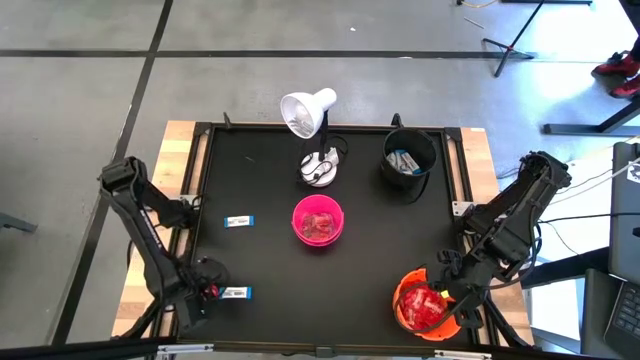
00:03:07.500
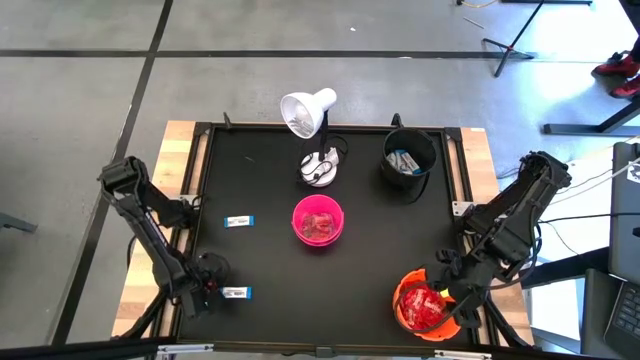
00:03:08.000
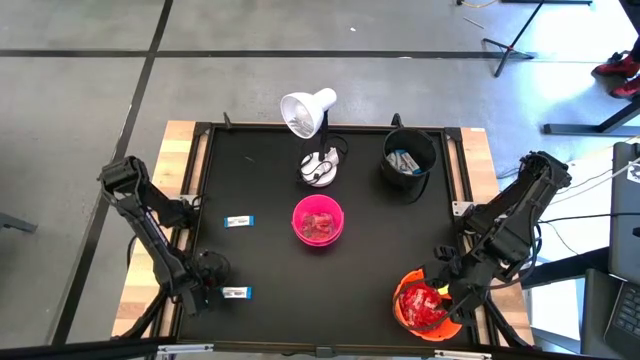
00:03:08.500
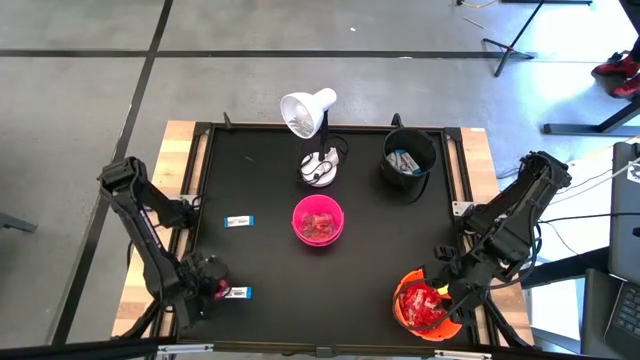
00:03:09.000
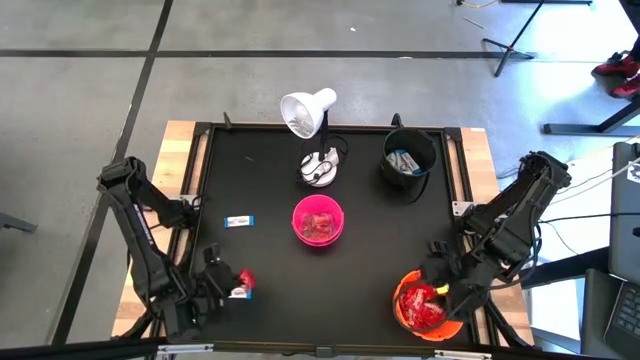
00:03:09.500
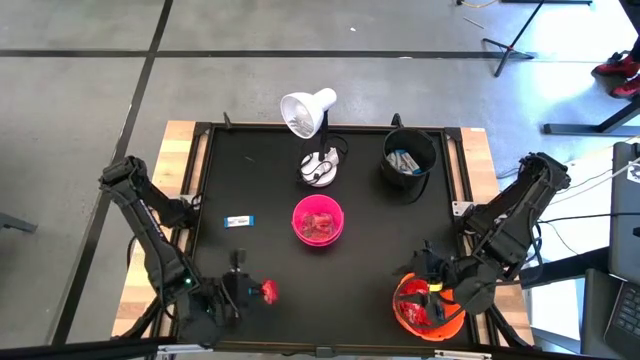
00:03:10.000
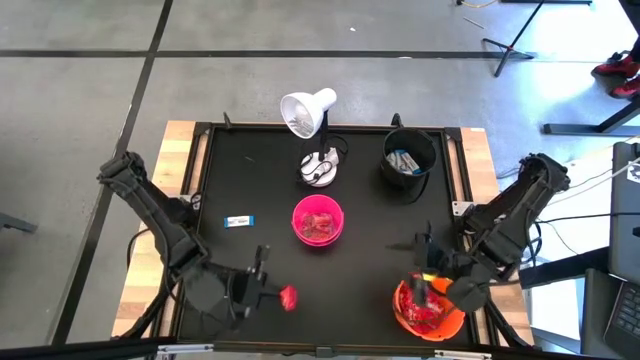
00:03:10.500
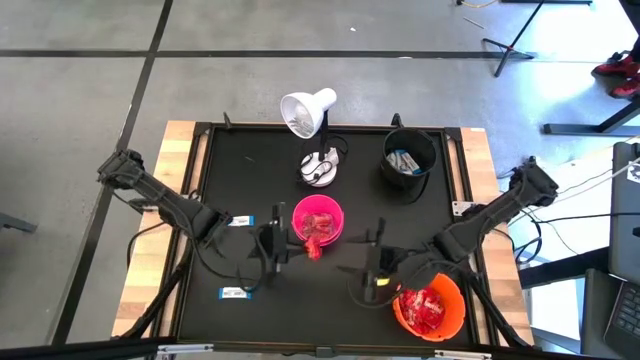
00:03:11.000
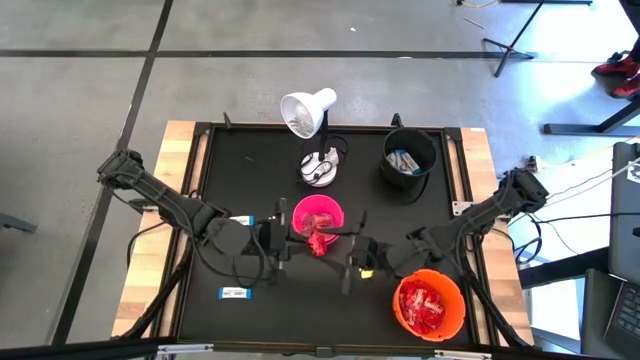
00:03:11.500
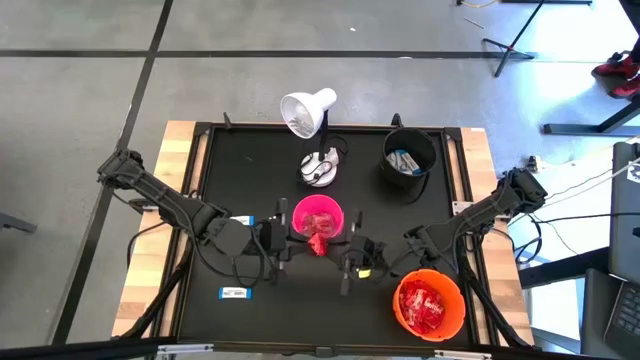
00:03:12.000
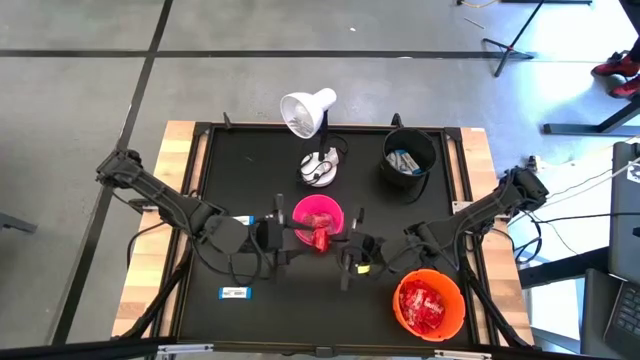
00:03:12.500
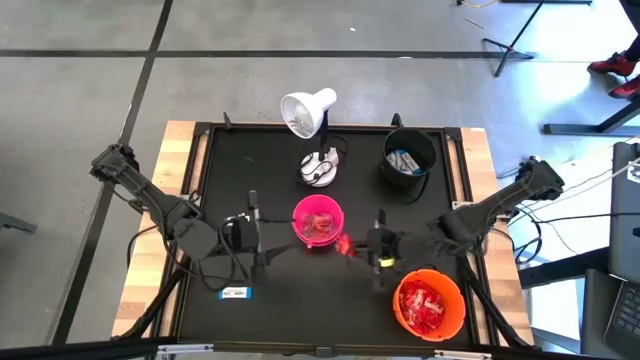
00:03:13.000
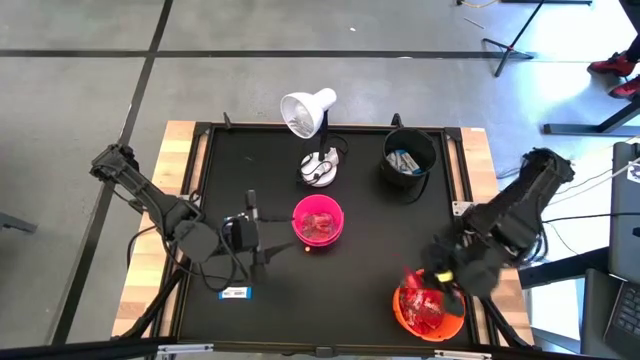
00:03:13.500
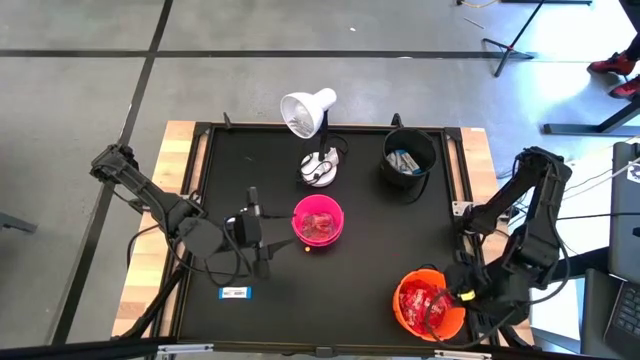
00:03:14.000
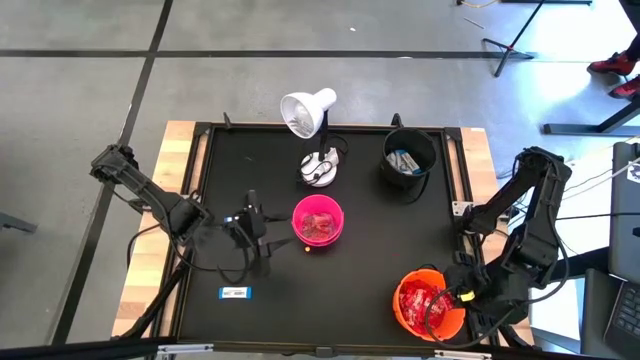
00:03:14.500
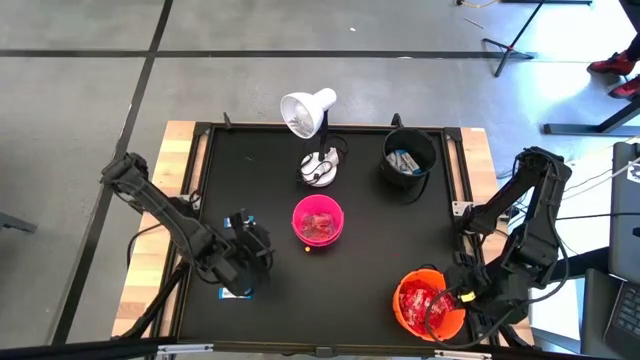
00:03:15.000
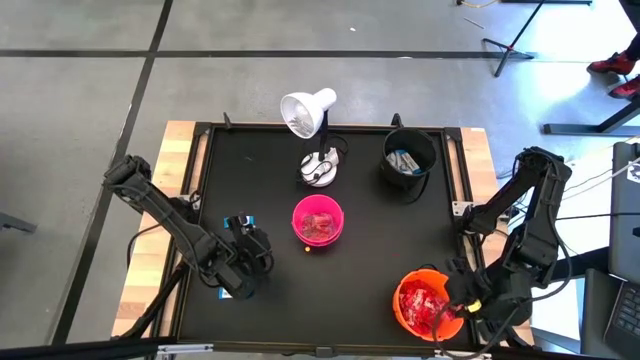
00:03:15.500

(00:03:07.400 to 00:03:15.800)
Task: Sort candy
Put the red candy into the orange bucket

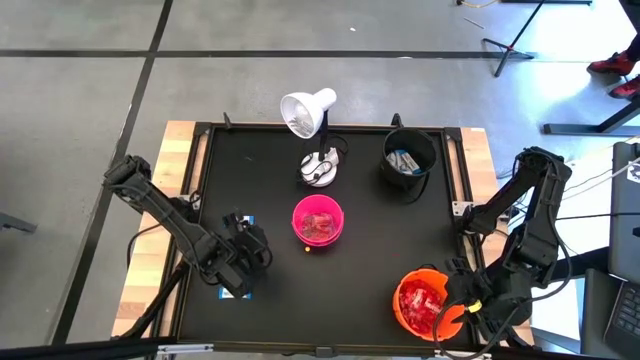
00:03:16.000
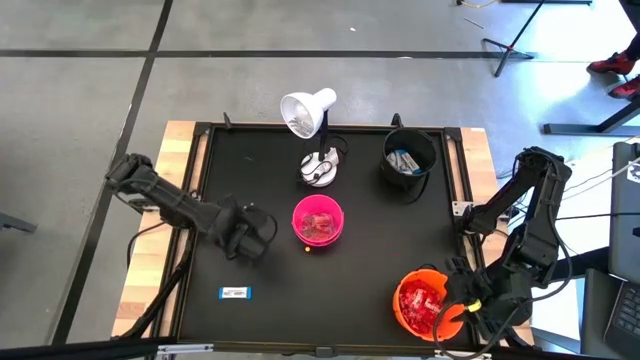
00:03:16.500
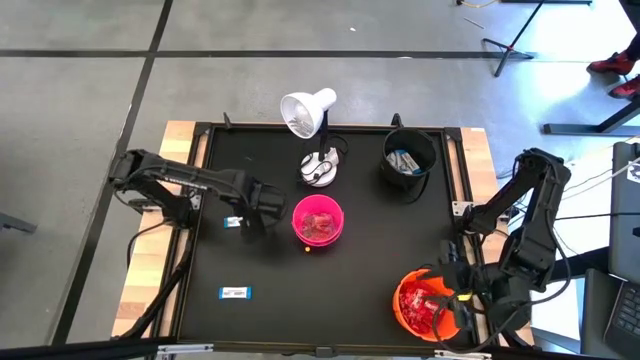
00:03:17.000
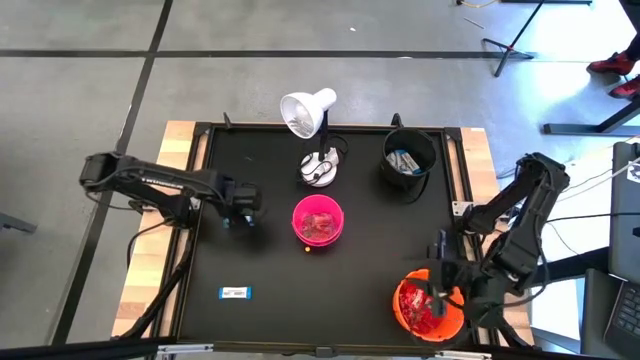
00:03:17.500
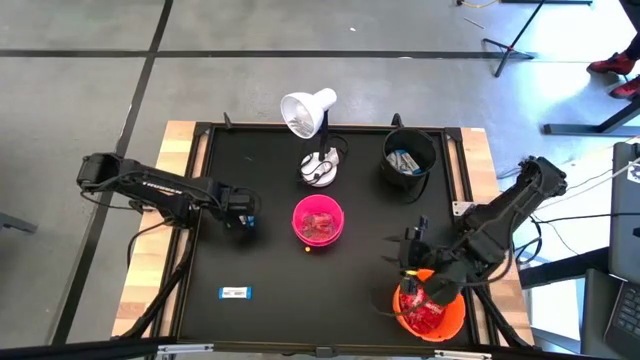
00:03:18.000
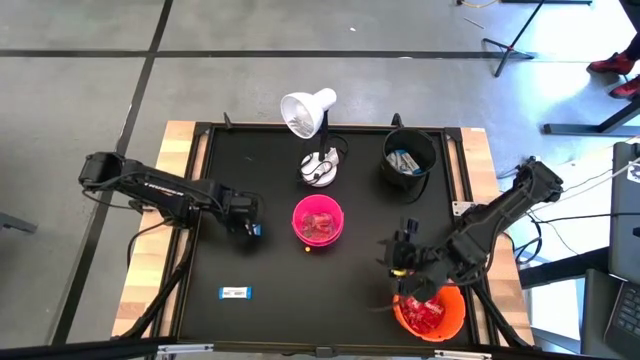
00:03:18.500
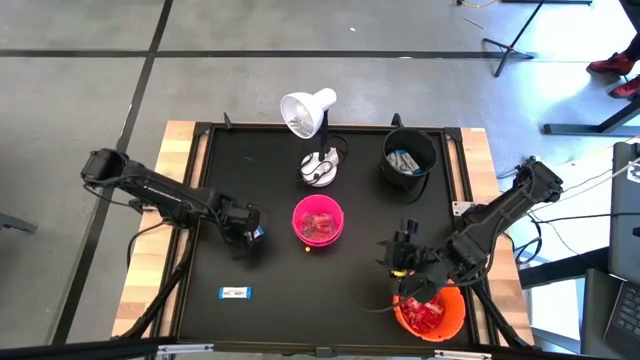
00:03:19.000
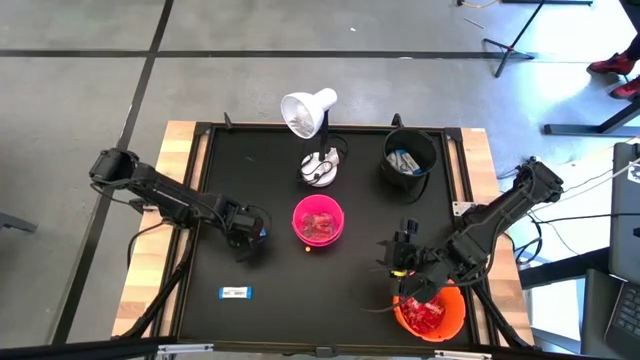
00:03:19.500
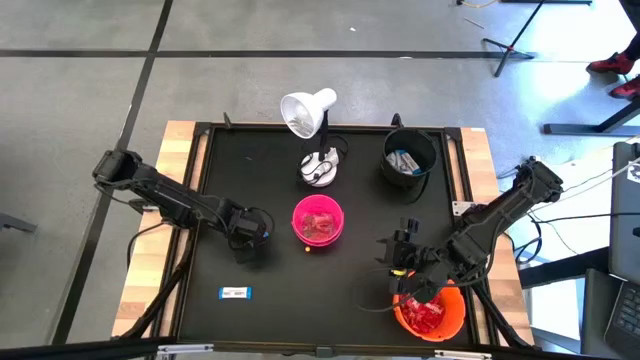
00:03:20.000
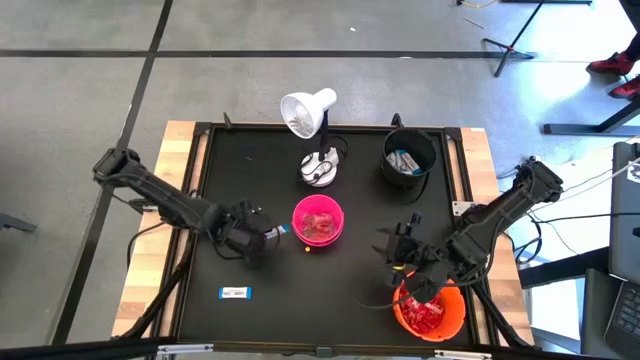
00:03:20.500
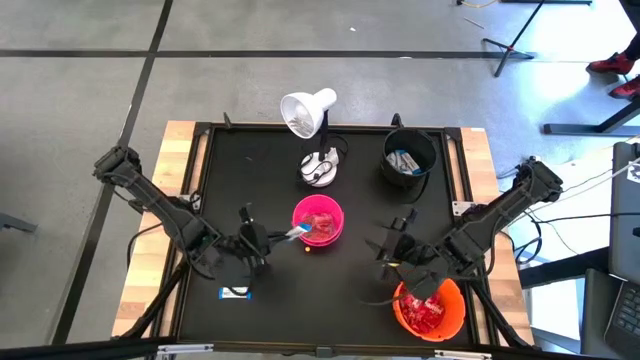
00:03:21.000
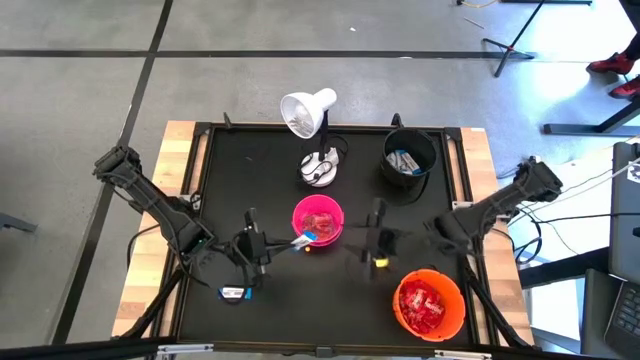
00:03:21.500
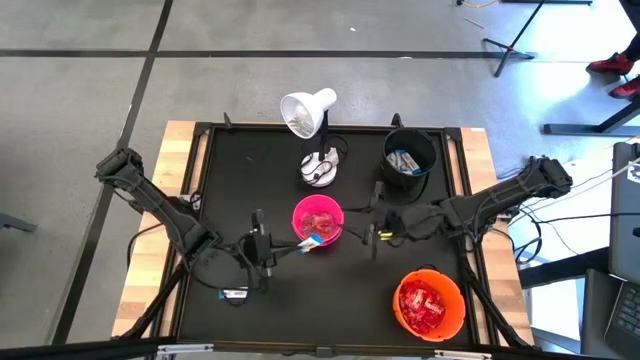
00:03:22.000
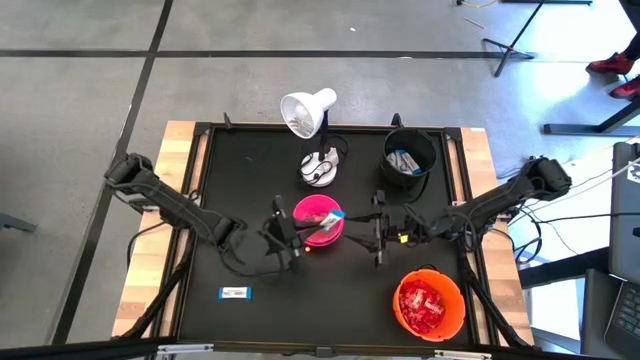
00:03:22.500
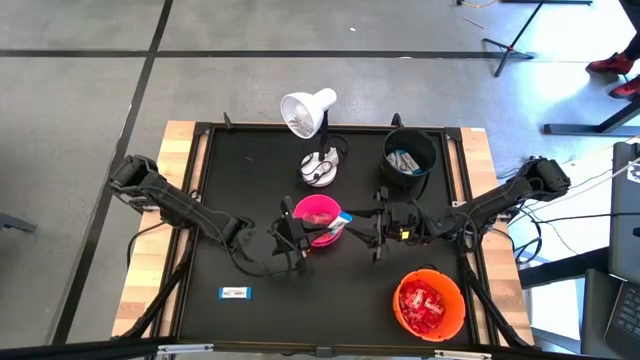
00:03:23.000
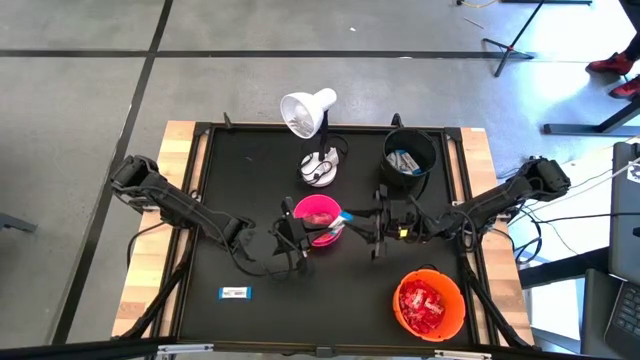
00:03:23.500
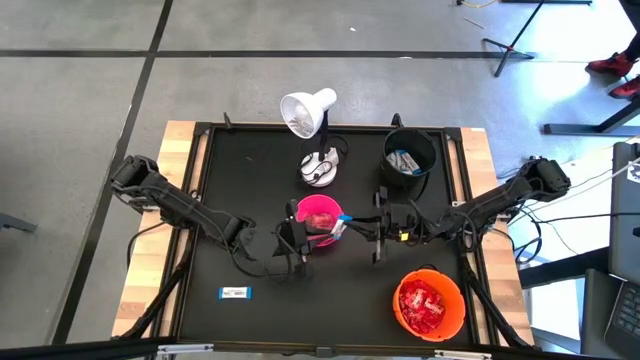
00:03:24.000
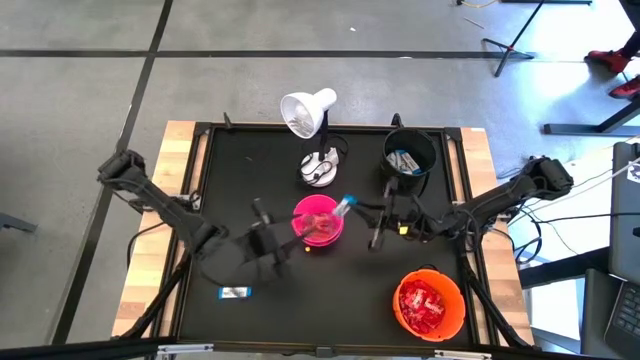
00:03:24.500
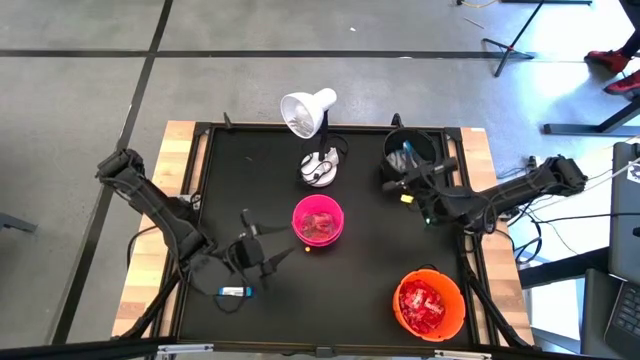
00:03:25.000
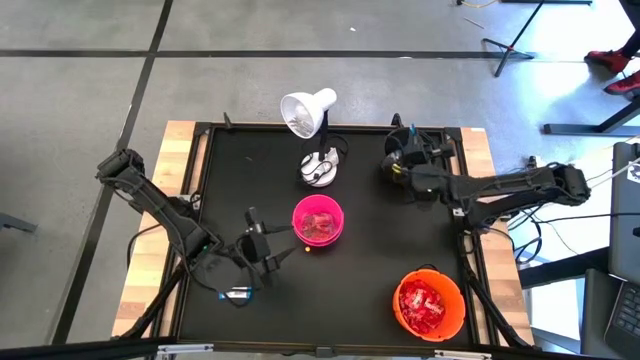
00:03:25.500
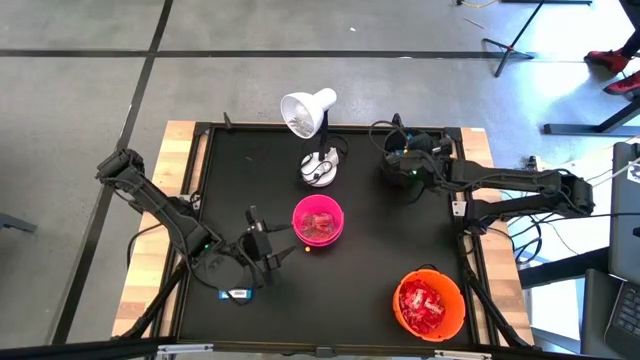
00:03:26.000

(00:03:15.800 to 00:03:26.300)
Put the white chocolate bar into the black bucket

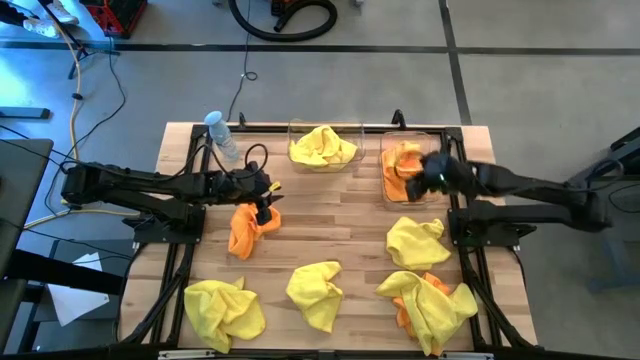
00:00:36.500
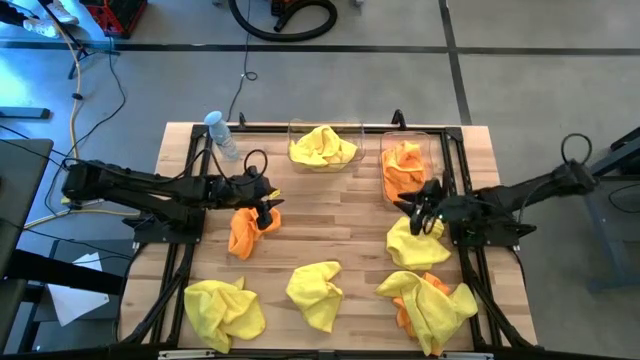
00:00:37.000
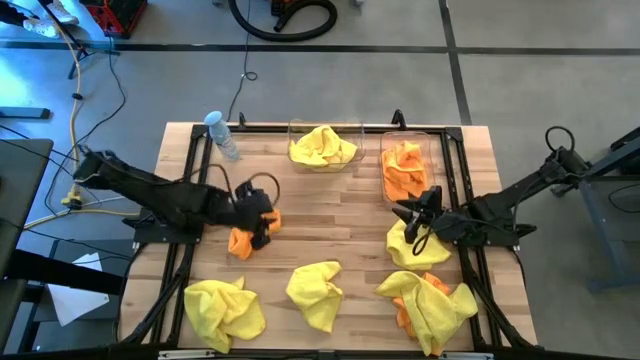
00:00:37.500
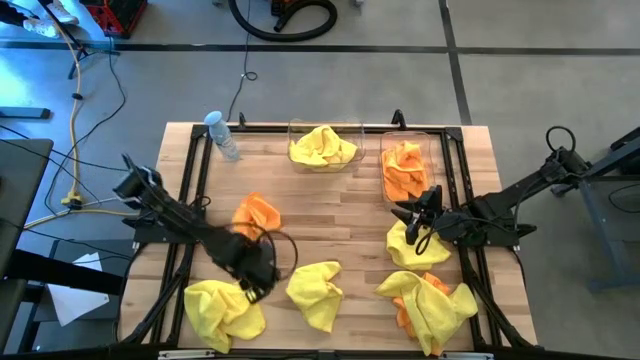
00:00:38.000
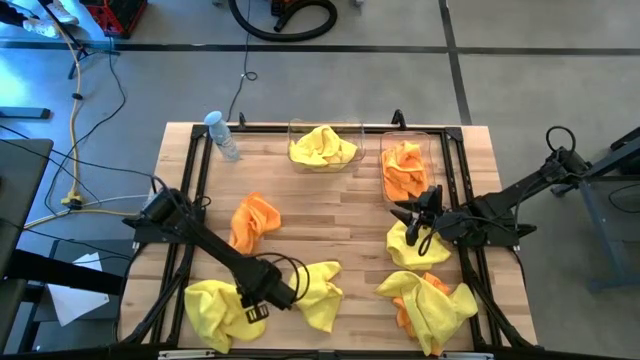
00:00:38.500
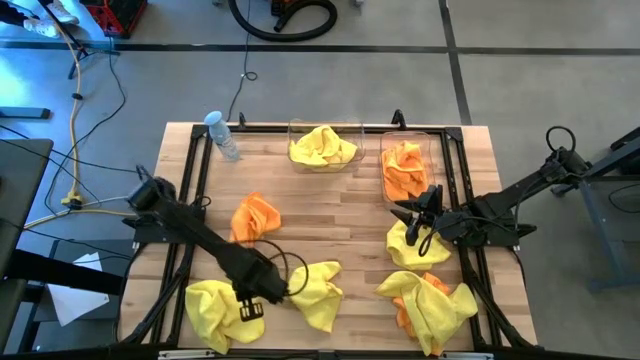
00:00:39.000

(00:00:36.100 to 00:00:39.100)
Task: Sort microfiber towel by color & place in baskets
Put the yellow microfiber towel into the left transparent bin
